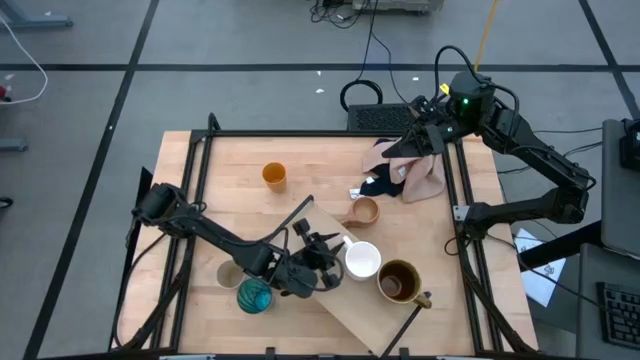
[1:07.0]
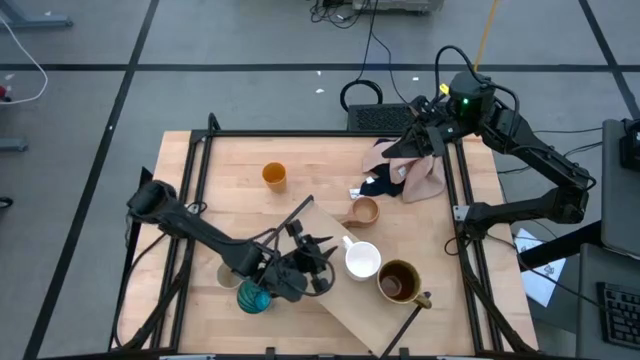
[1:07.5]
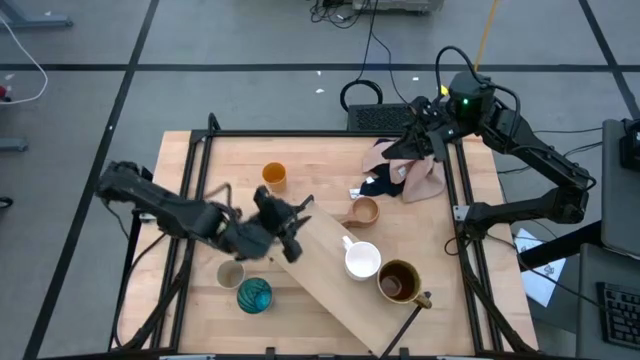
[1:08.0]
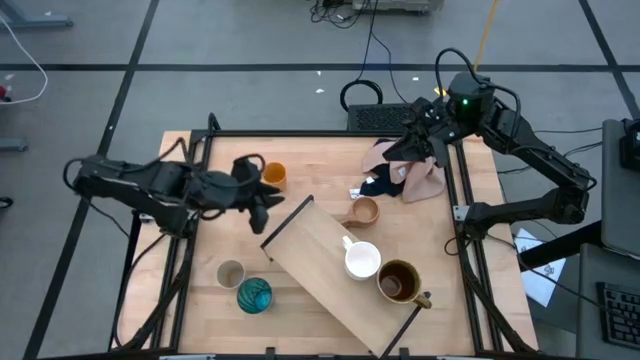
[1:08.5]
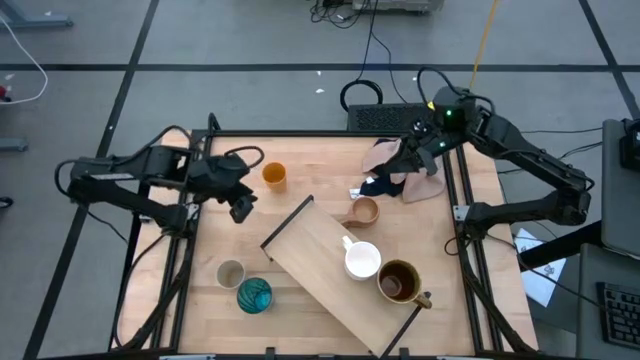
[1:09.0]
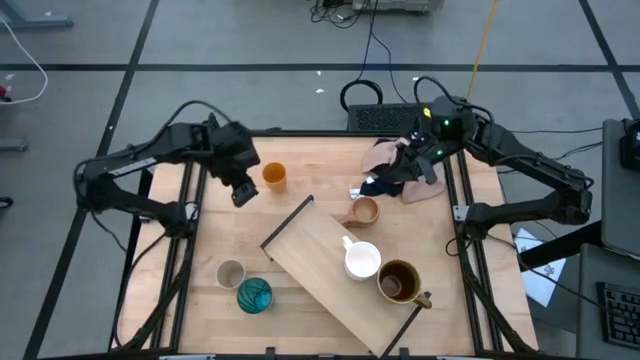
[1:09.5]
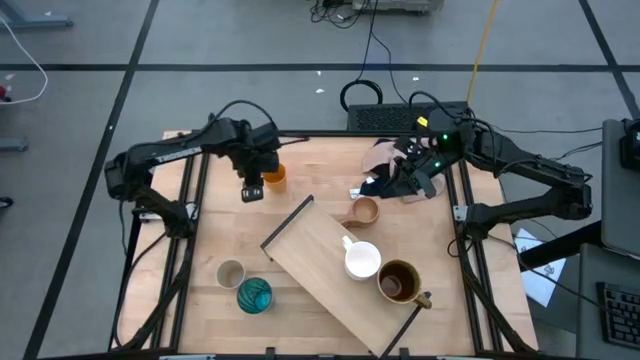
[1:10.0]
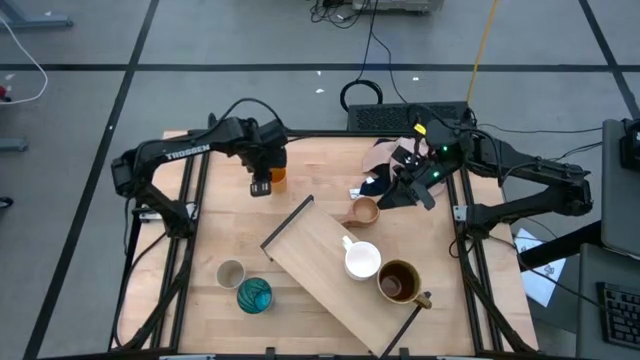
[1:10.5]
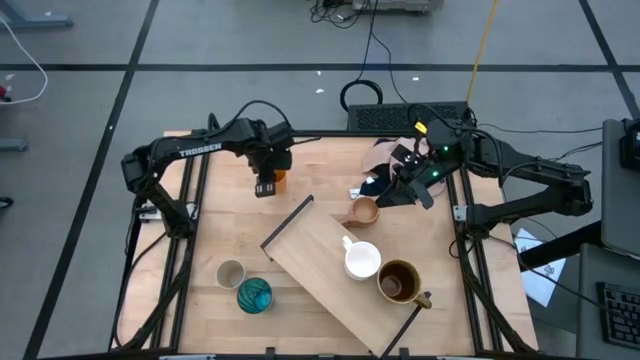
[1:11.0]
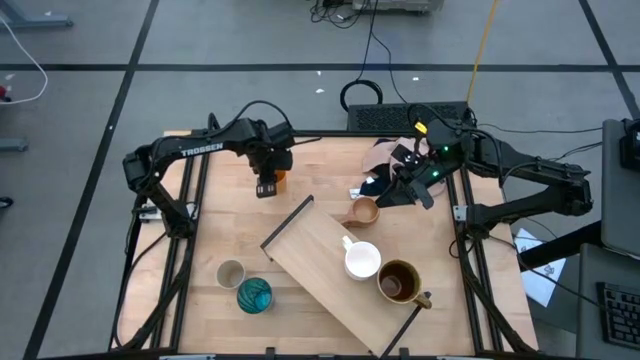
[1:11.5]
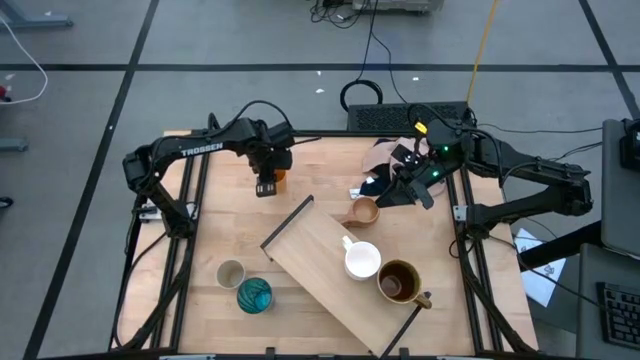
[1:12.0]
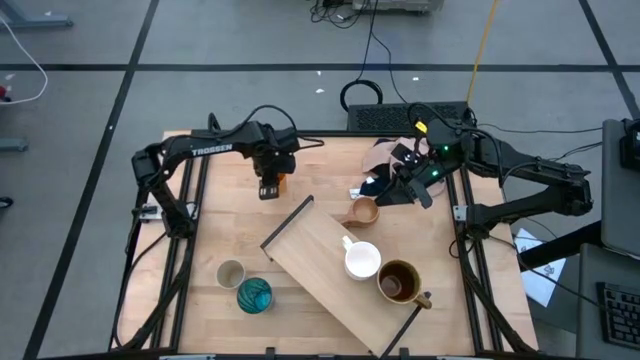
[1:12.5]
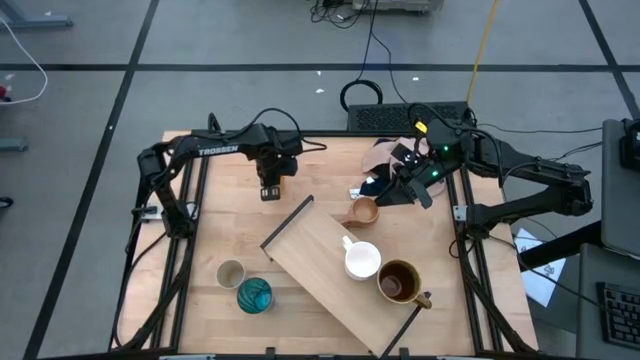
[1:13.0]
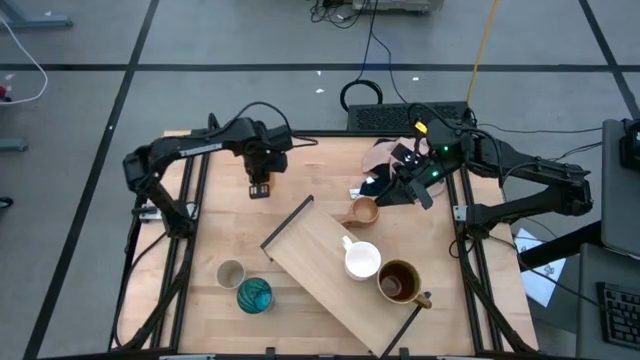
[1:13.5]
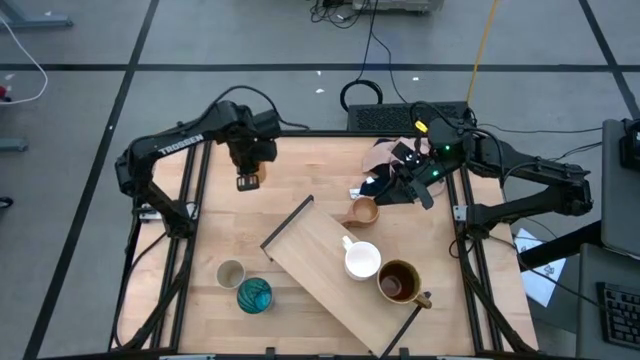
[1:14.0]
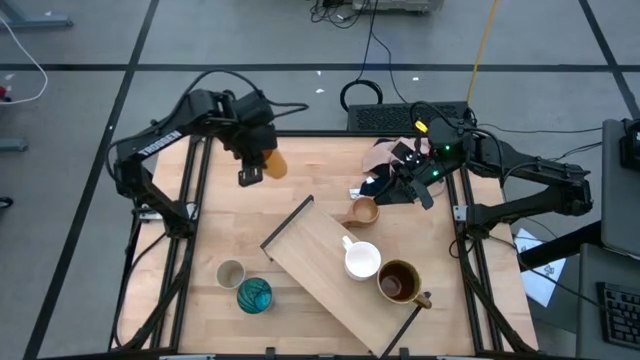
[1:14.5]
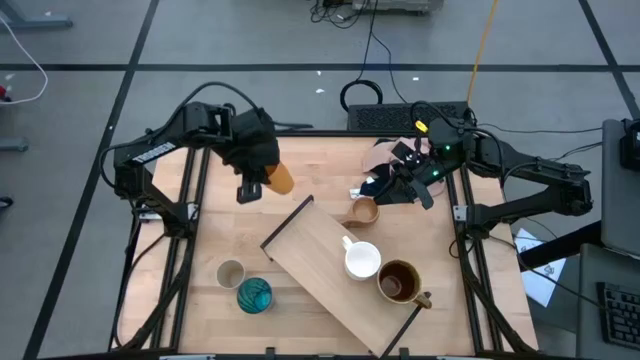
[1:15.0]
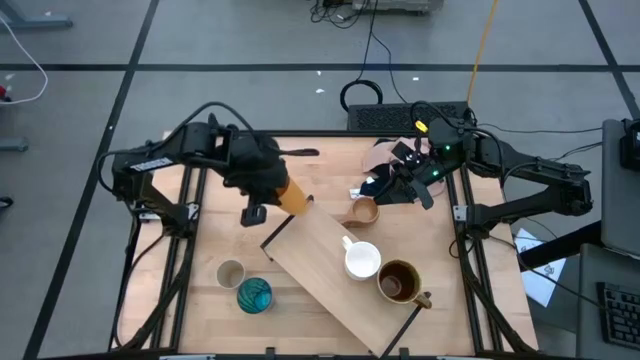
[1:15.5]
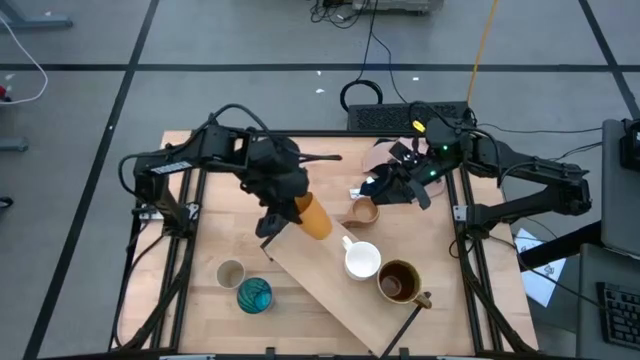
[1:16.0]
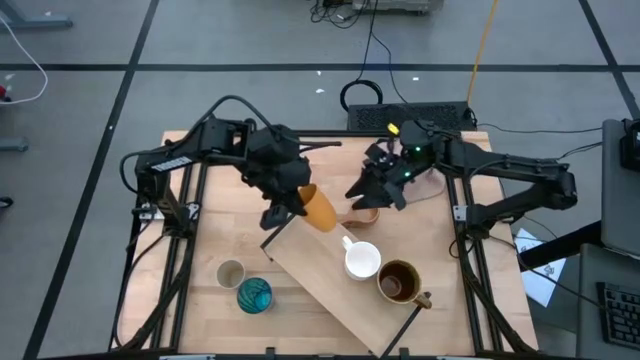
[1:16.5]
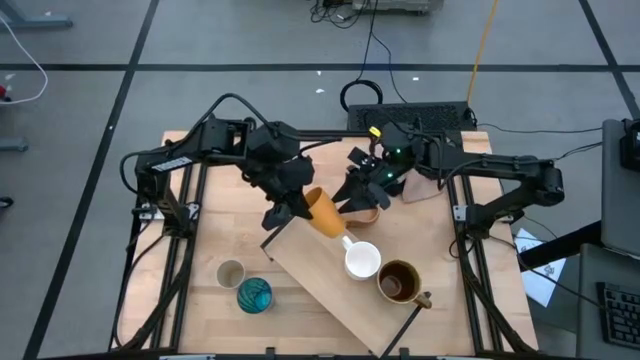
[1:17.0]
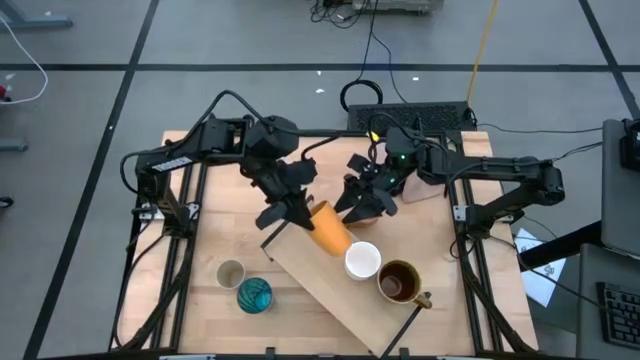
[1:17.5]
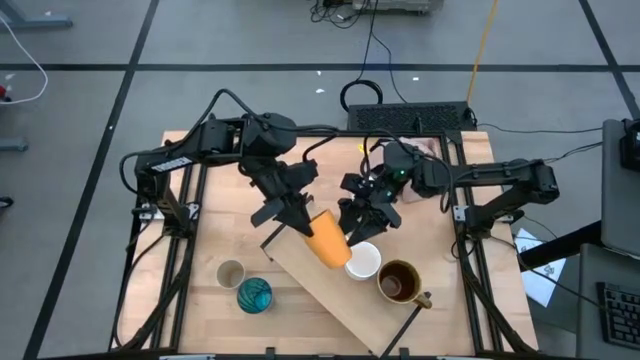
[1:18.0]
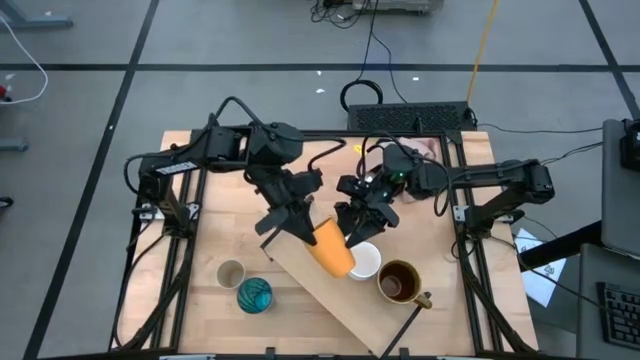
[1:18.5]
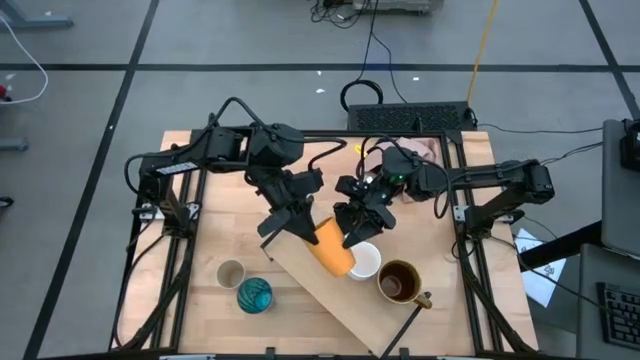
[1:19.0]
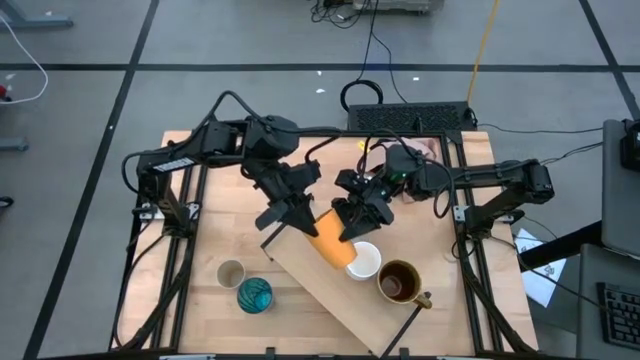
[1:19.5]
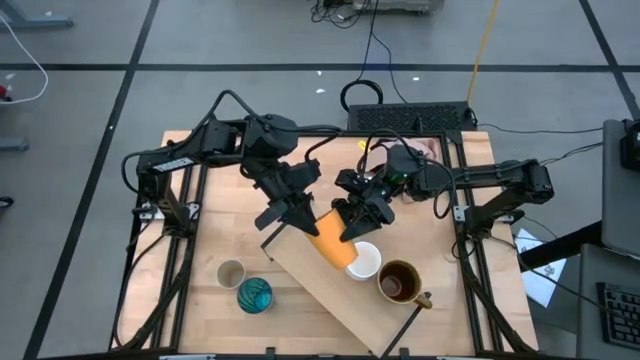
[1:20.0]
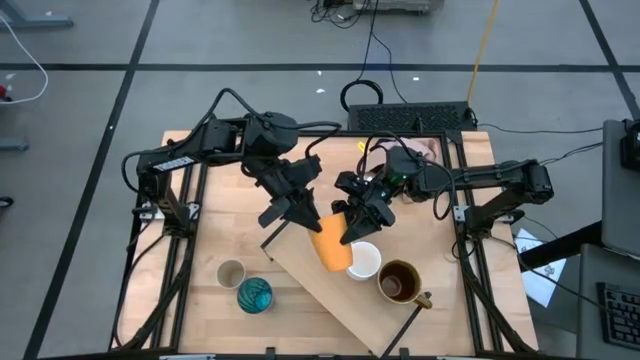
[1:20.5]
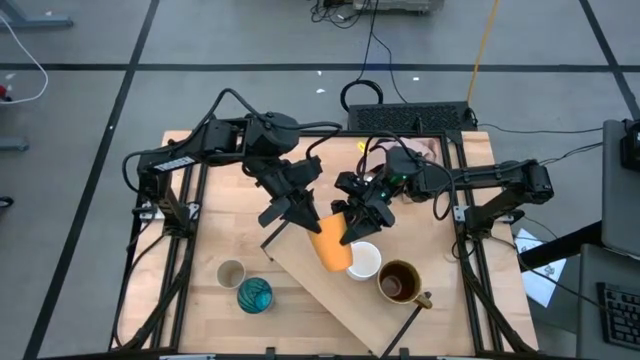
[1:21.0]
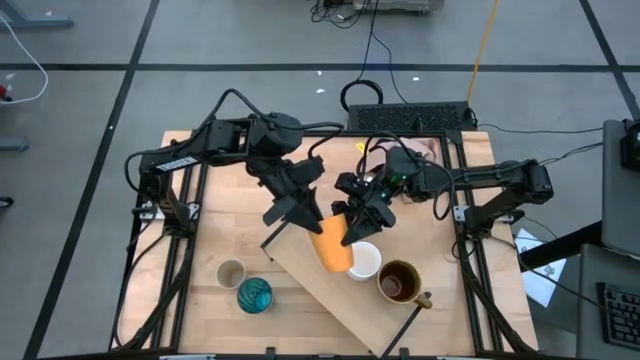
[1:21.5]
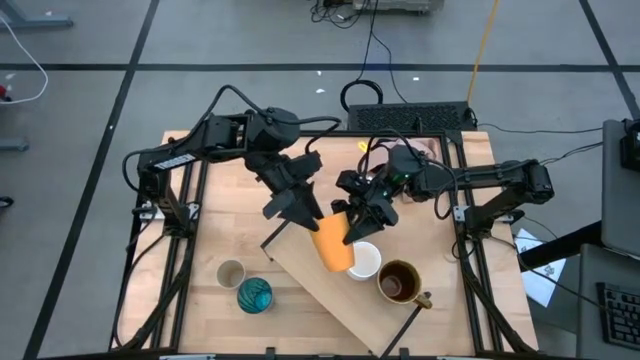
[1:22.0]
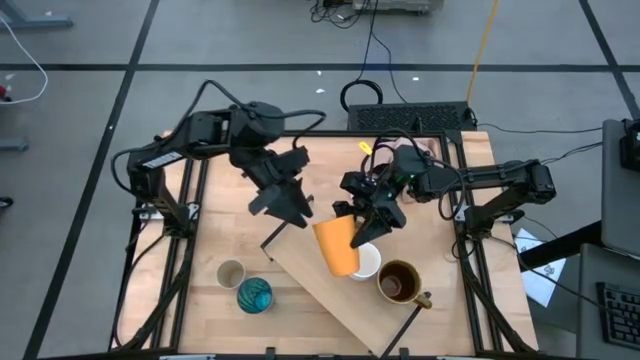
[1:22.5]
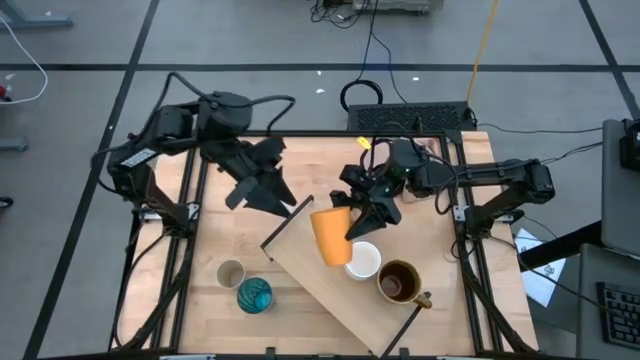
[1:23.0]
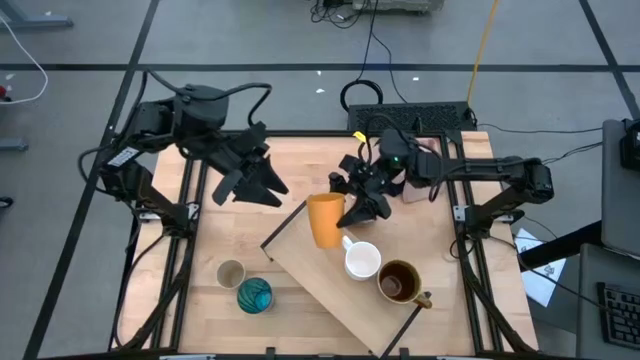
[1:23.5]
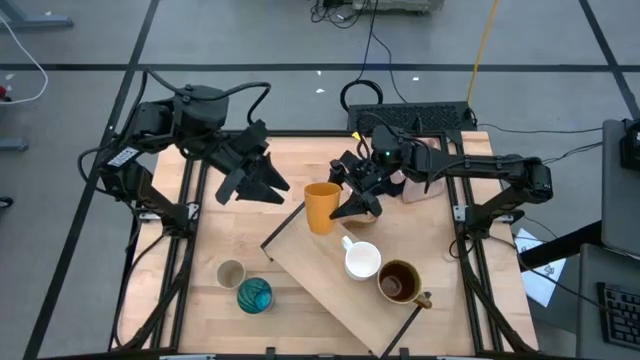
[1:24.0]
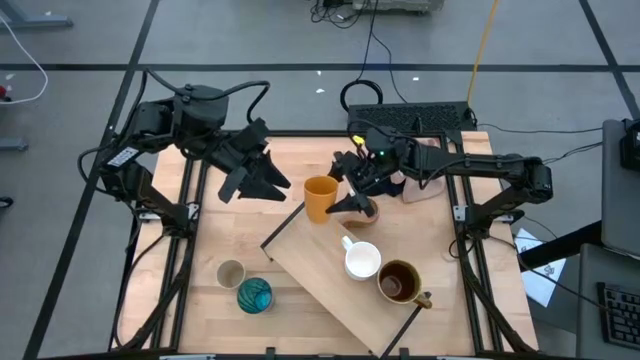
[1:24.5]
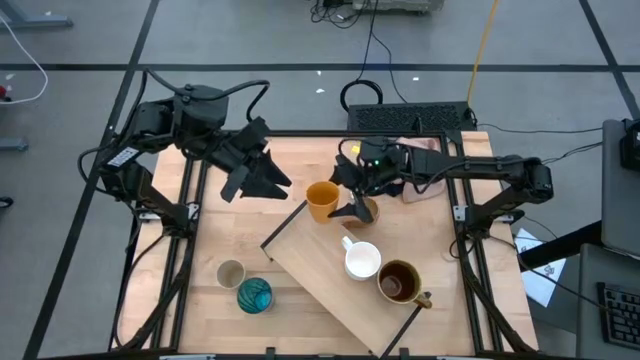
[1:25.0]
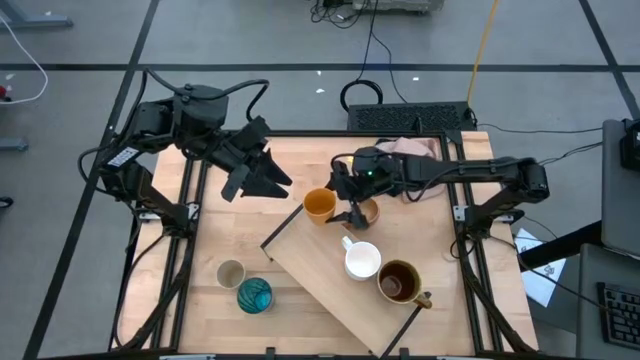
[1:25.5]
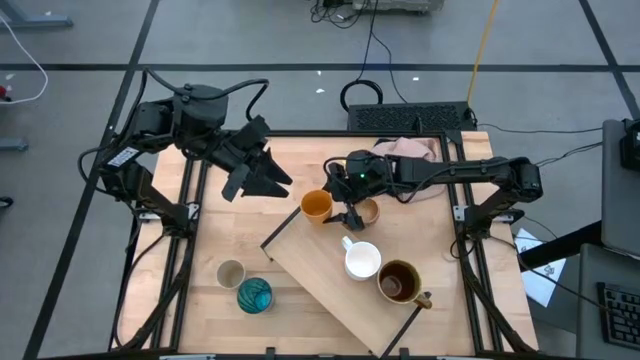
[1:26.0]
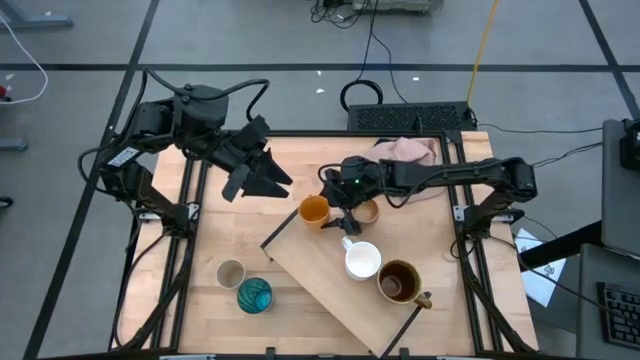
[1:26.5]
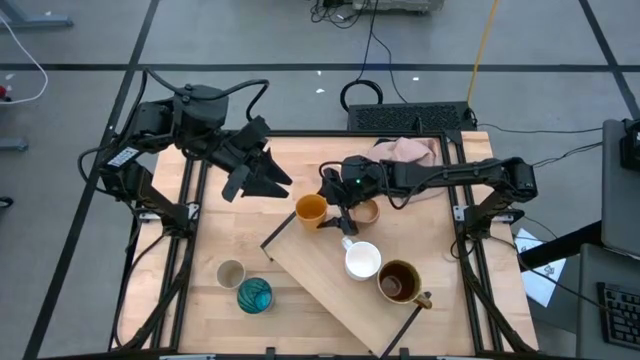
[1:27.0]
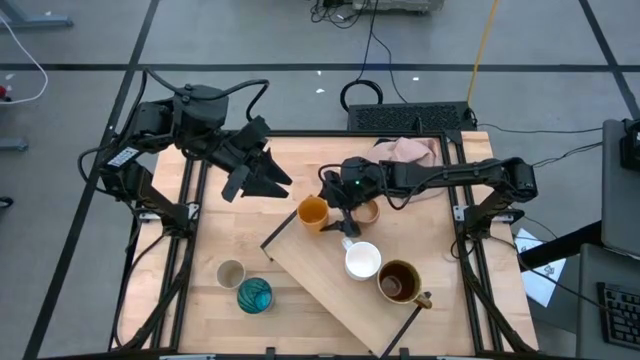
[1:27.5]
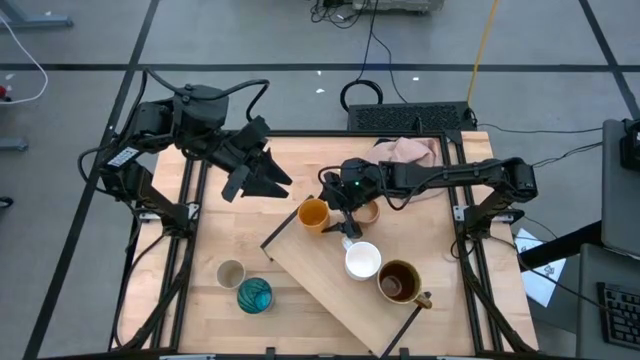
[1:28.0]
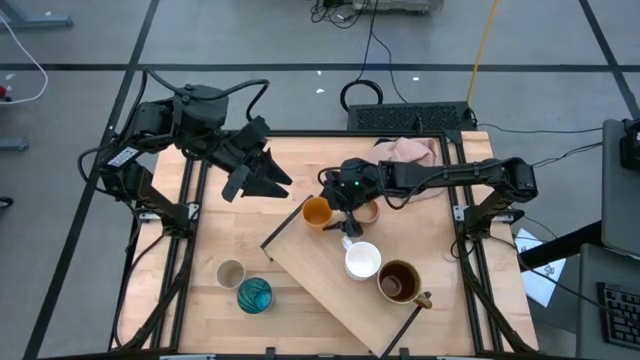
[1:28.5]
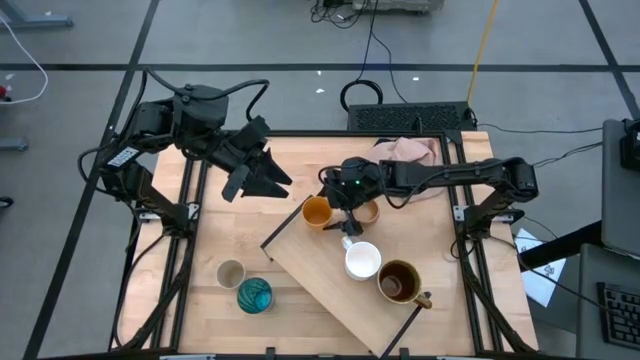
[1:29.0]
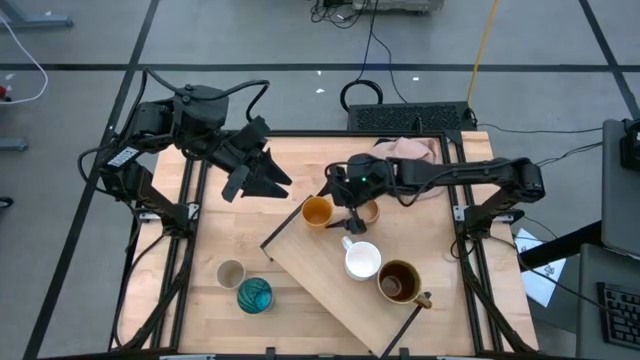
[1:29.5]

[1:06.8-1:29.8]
Task: Stack small to large cups/mugs on shelf
Put the yellow cup on the shelf
